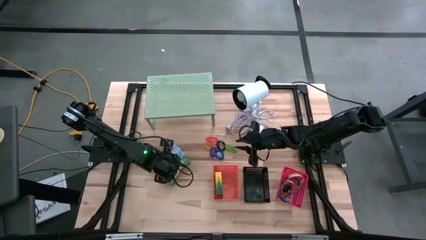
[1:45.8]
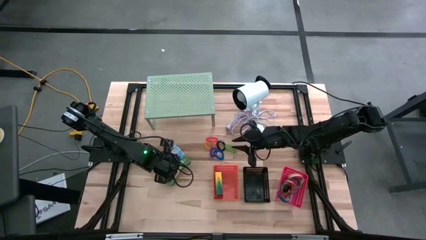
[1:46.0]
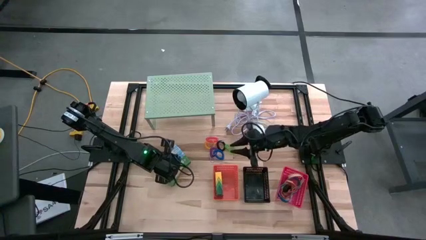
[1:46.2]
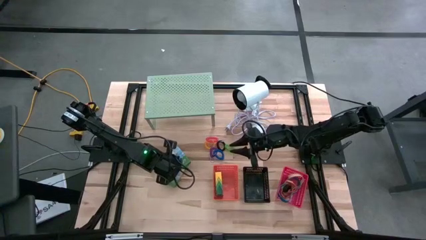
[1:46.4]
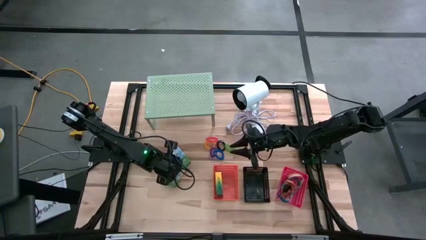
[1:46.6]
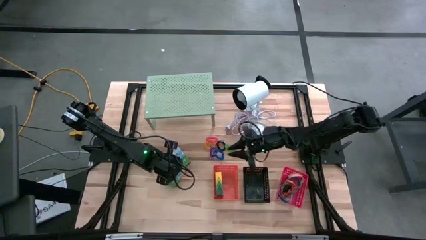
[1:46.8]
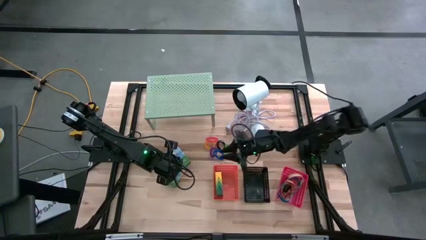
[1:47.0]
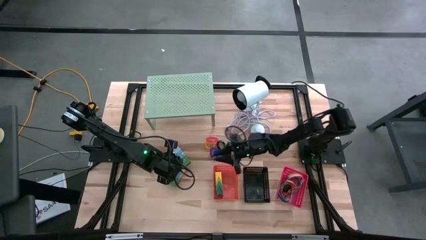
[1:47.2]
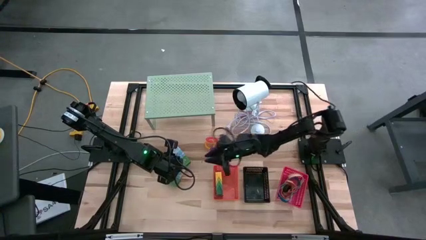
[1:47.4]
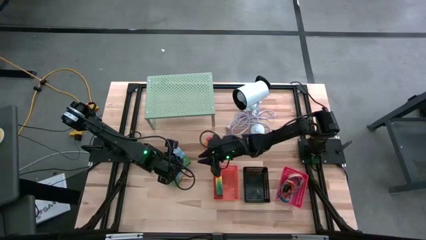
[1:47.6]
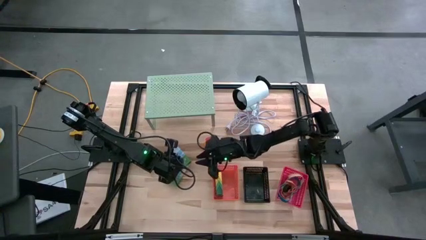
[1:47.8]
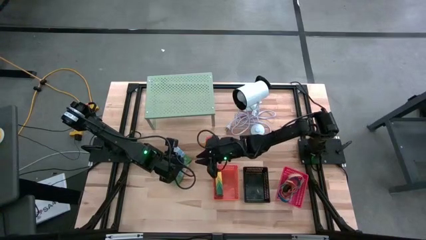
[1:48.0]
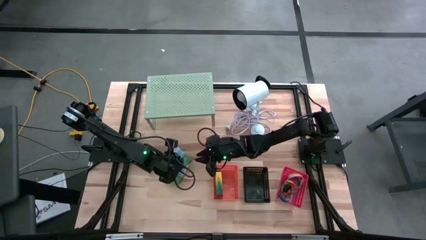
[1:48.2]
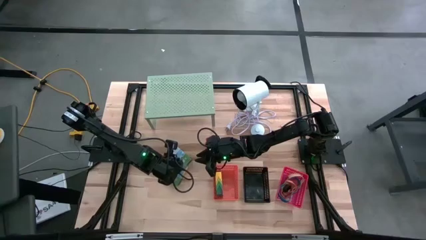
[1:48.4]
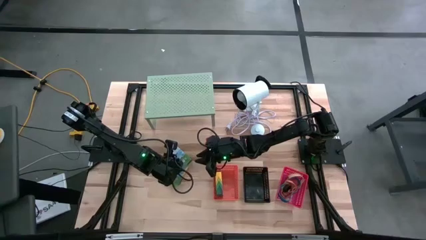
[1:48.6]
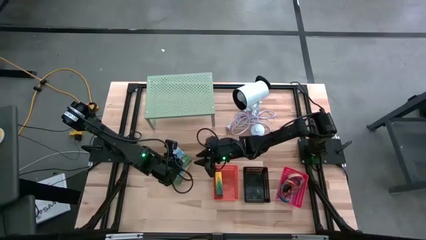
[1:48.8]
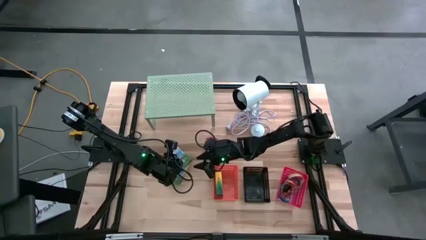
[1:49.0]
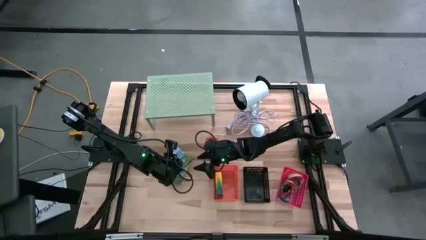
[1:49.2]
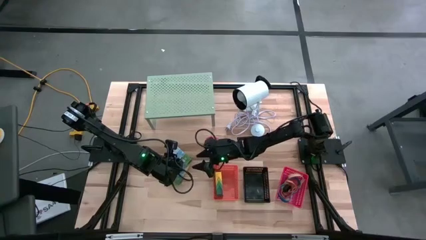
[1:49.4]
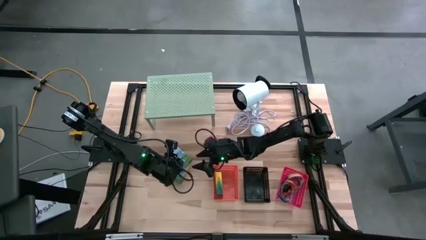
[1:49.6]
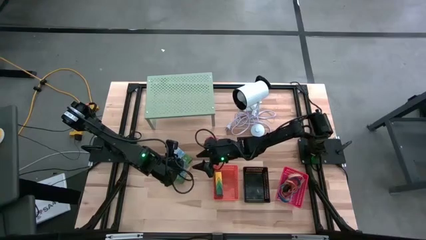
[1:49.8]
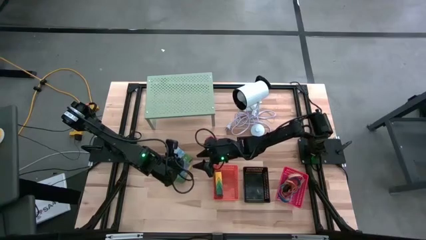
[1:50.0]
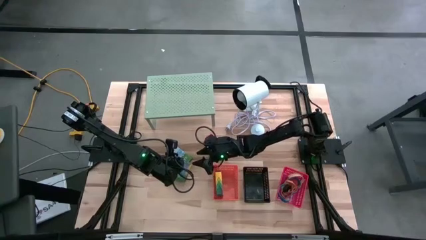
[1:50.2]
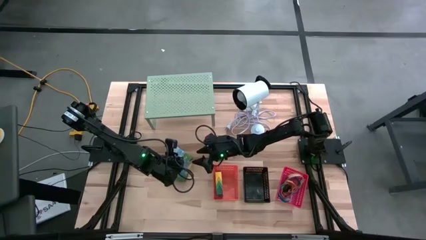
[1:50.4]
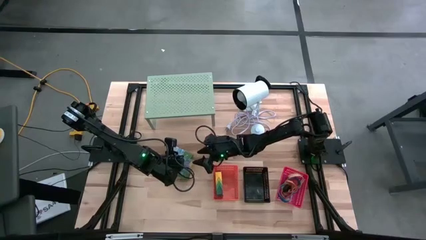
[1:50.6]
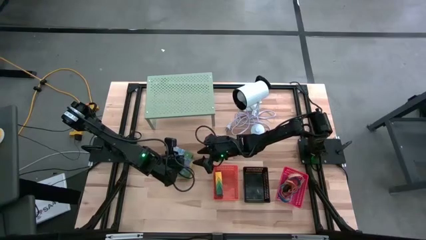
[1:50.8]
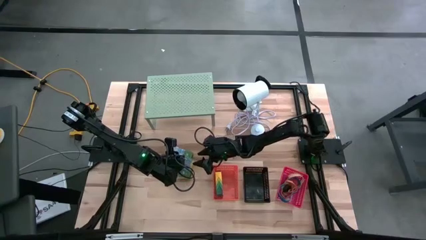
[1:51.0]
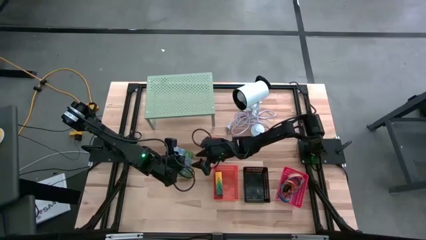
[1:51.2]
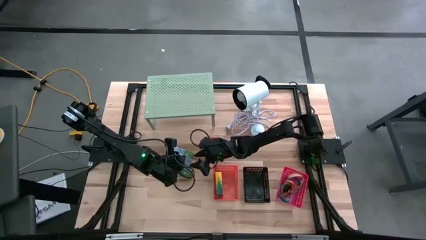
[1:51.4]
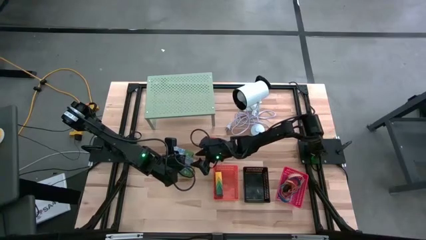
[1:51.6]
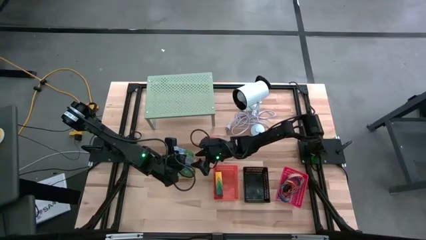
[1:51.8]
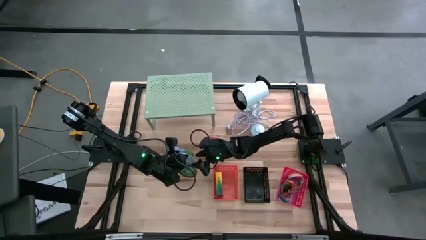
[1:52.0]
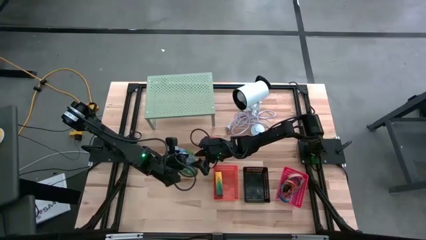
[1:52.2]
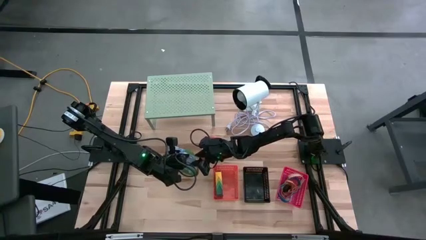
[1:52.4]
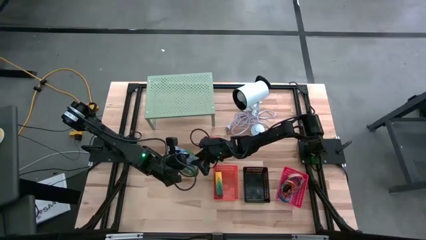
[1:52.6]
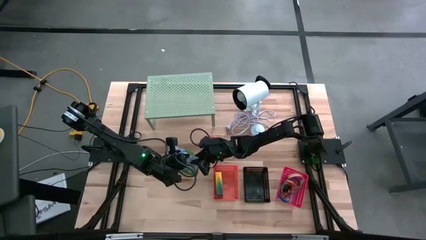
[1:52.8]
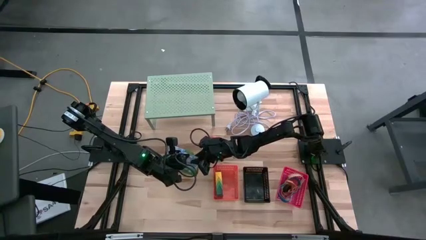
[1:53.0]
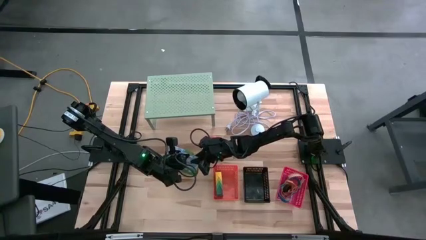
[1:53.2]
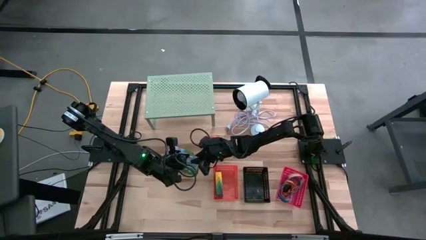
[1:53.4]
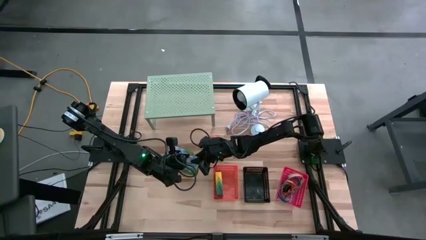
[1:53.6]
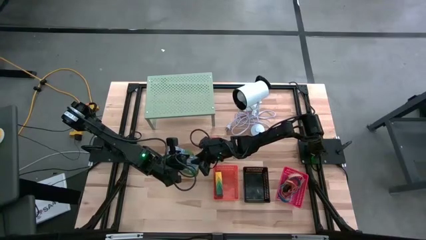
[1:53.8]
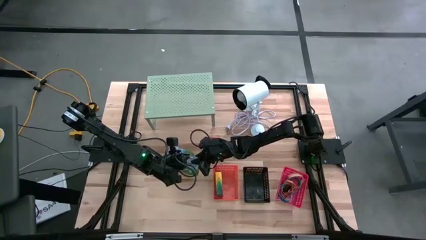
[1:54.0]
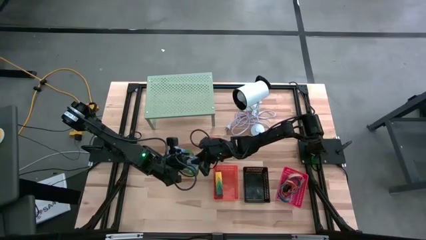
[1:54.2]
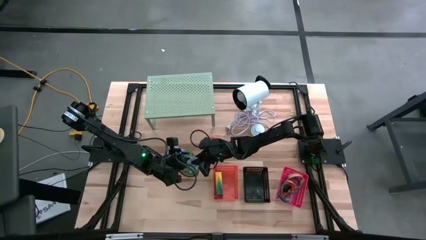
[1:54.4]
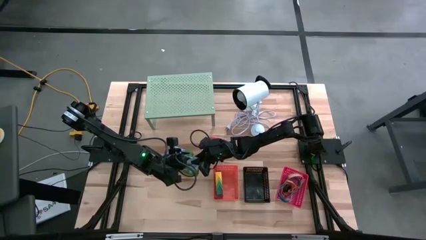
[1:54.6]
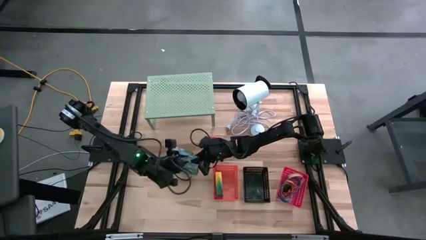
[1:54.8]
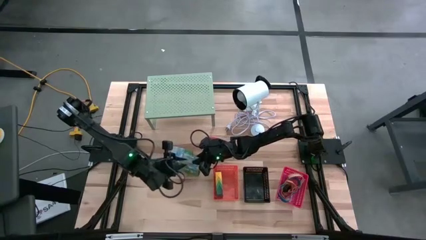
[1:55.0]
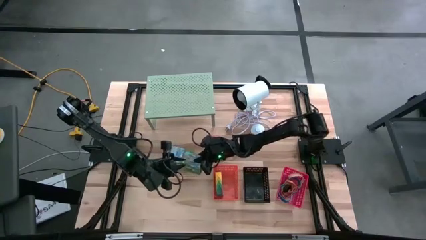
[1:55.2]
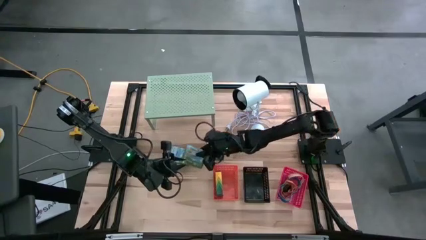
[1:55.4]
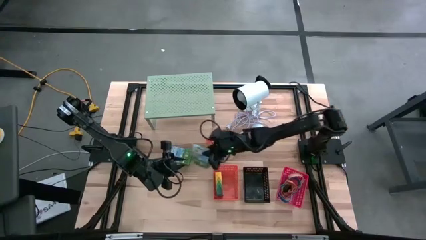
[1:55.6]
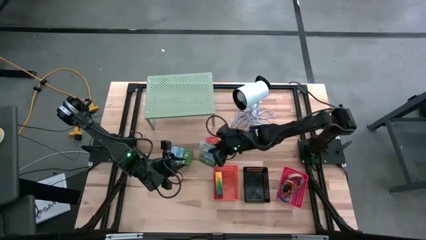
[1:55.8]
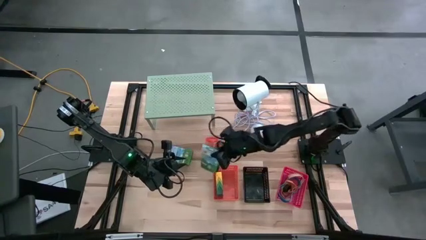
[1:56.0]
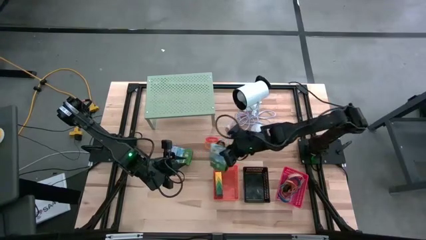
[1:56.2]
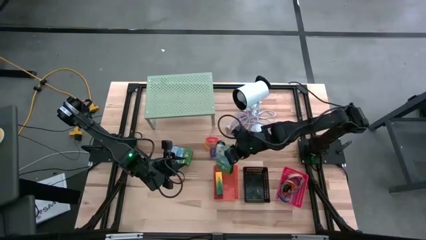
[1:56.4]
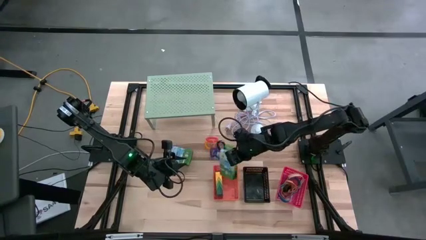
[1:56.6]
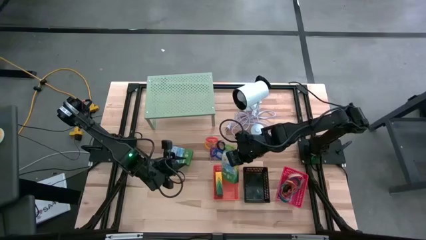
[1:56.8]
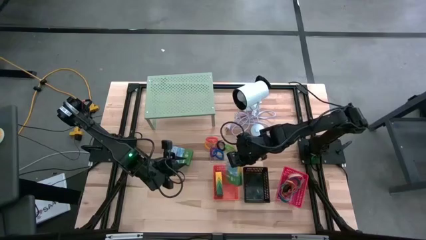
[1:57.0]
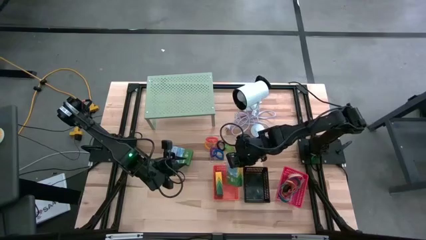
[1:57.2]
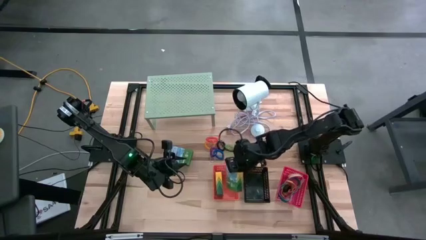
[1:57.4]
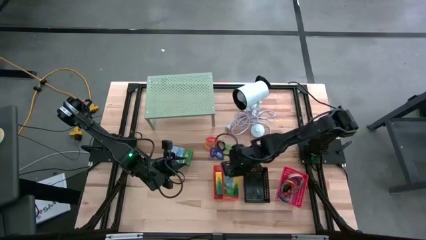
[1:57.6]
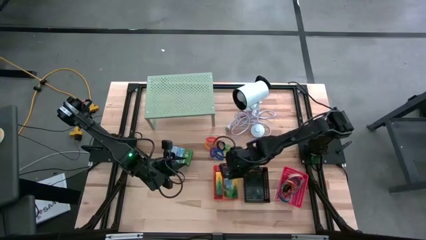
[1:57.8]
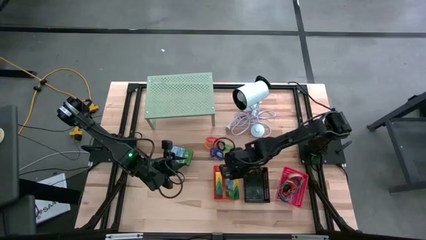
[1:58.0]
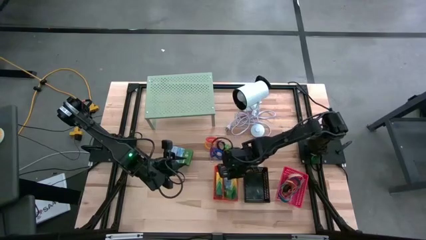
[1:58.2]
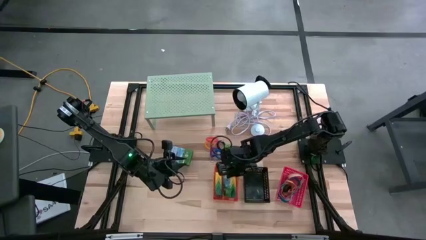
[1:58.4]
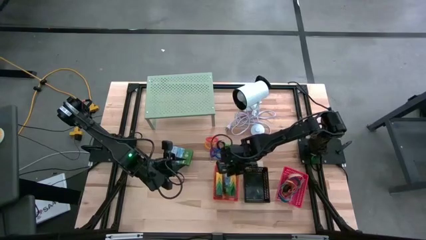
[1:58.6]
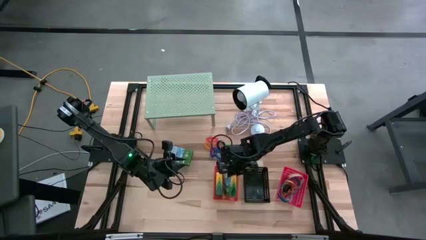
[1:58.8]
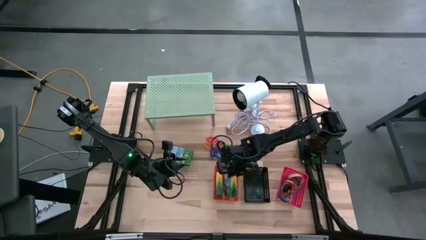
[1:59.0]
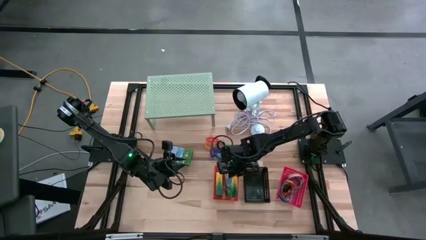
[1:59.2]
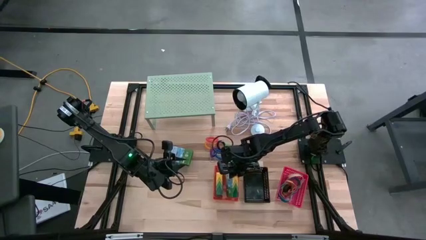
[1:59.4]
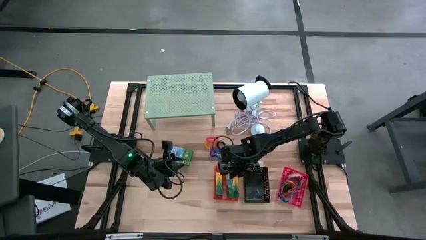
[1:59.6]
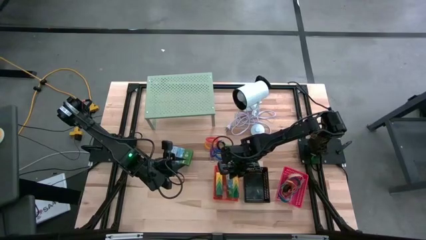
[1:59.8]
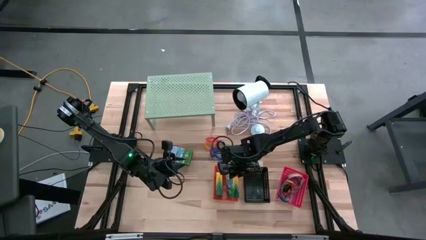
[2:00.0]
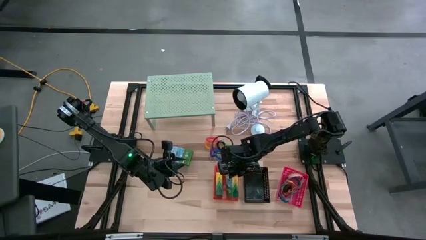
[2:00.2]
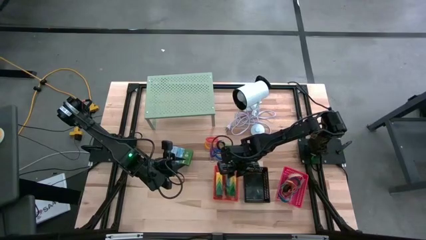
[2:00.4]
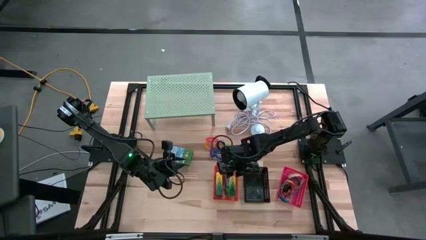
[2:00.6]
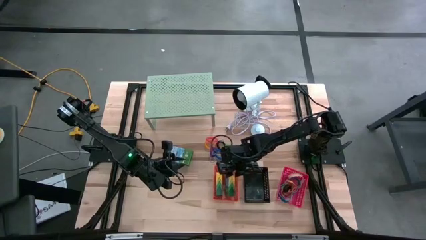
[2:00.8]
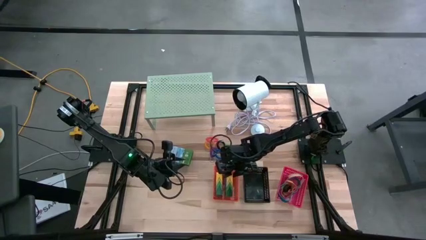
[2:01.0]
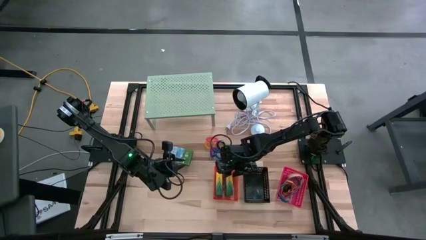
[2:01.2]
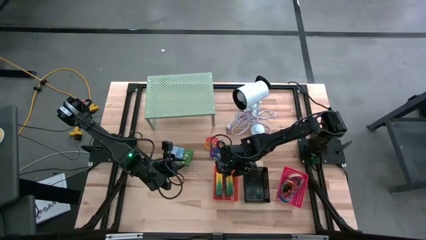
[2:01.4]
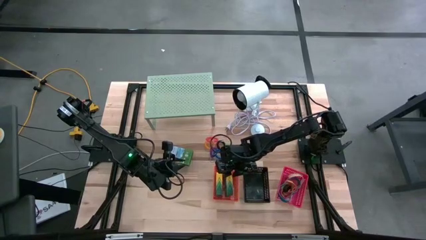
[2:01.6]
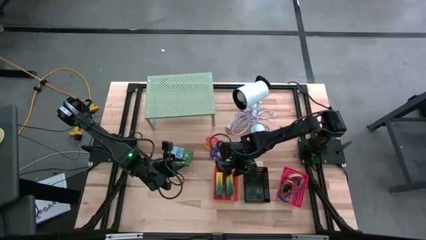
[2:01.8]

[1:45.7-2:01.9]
Task: Pick & Place Office Desk Supplies
Put the bottom crayon box into the orange basket
